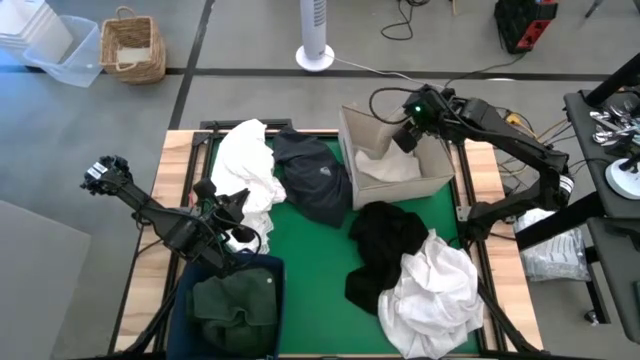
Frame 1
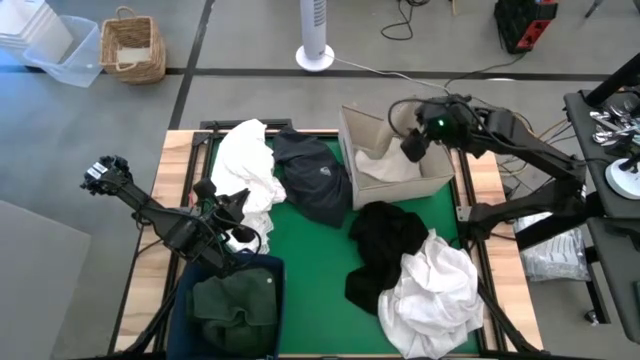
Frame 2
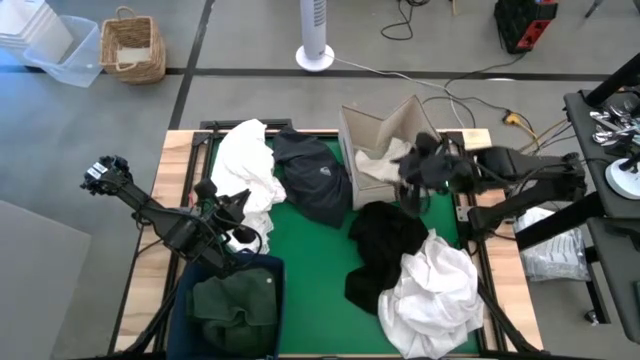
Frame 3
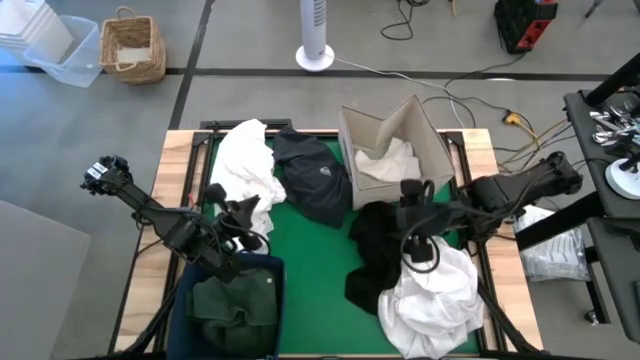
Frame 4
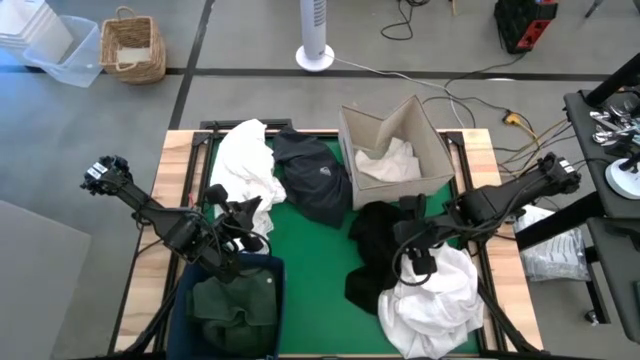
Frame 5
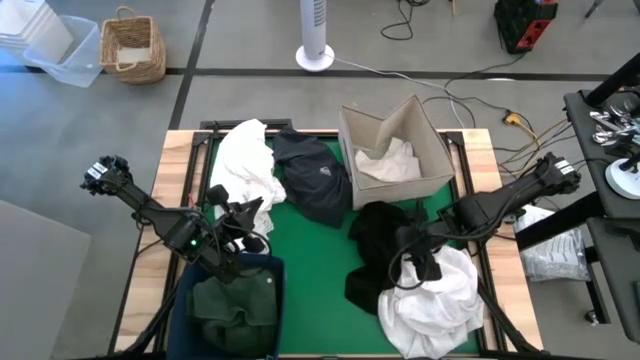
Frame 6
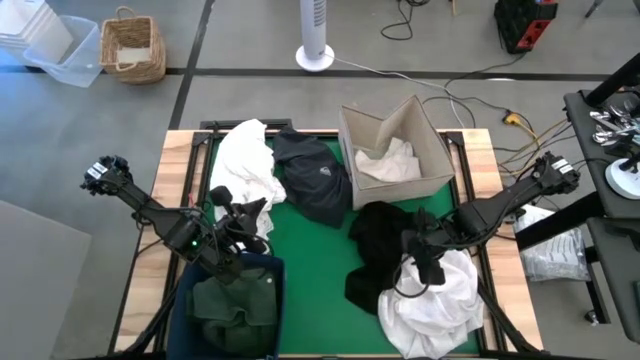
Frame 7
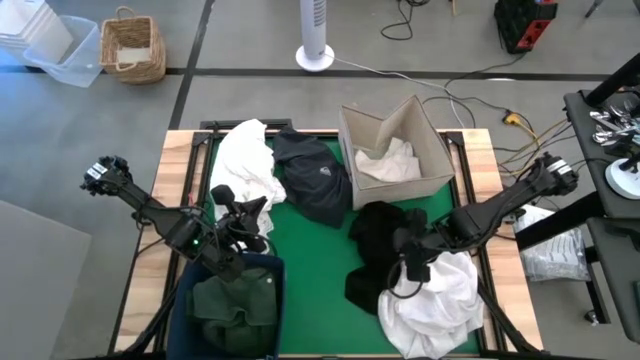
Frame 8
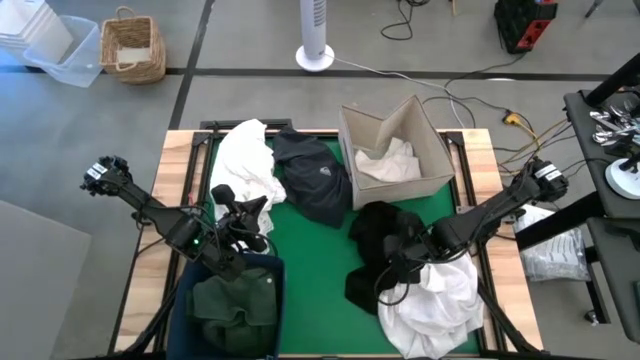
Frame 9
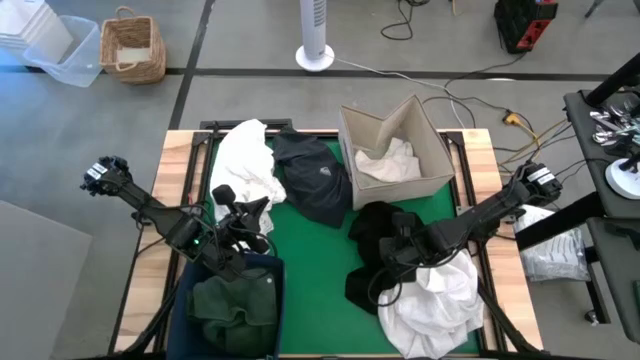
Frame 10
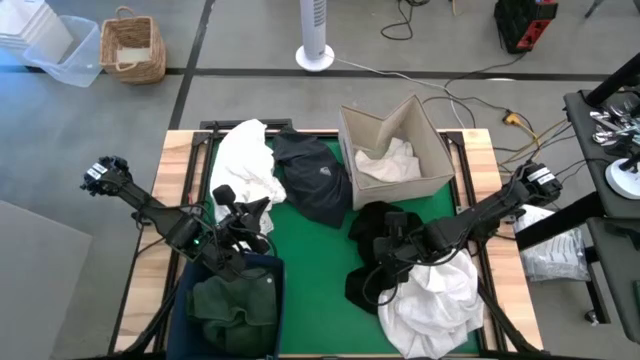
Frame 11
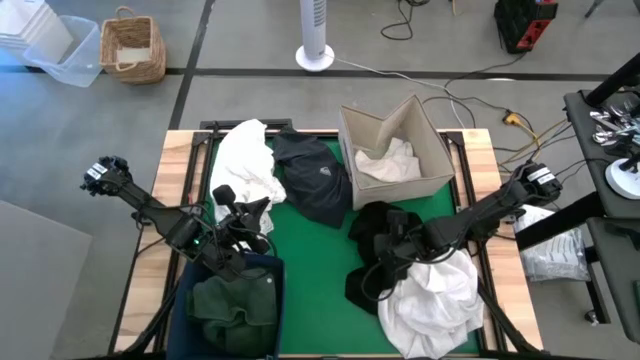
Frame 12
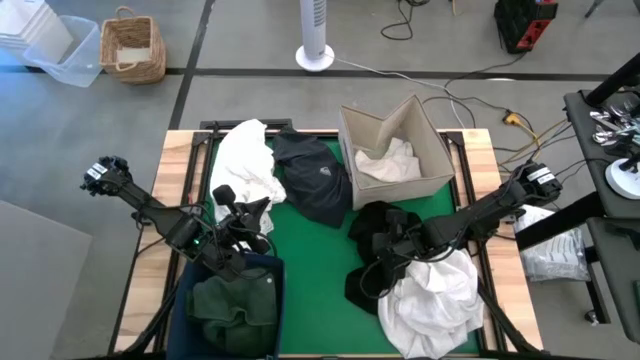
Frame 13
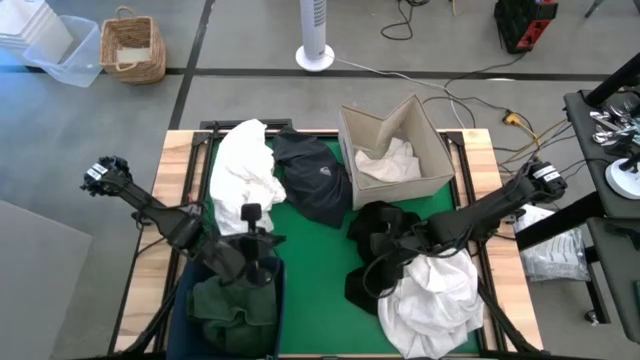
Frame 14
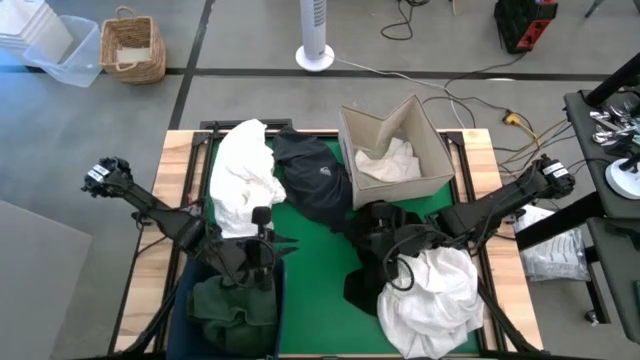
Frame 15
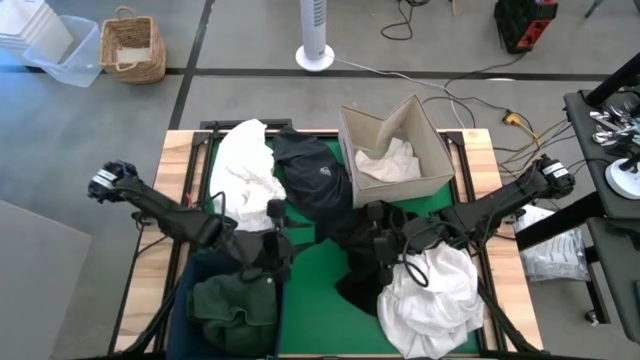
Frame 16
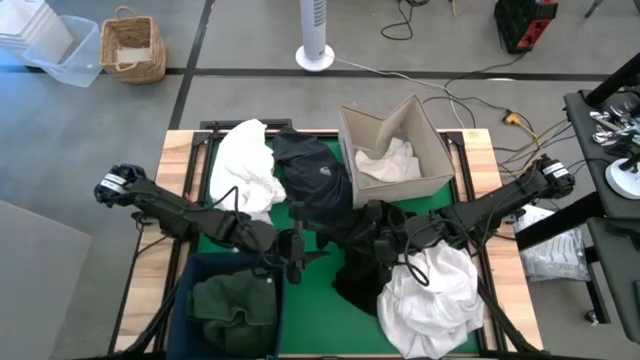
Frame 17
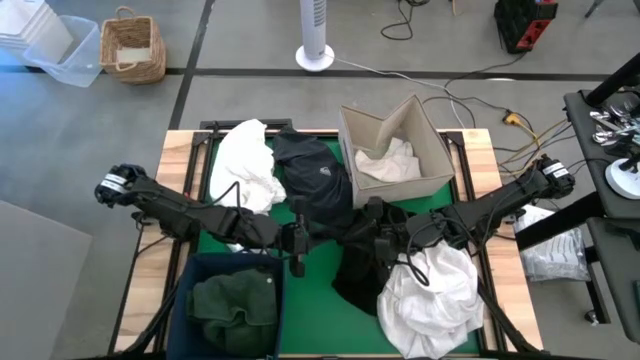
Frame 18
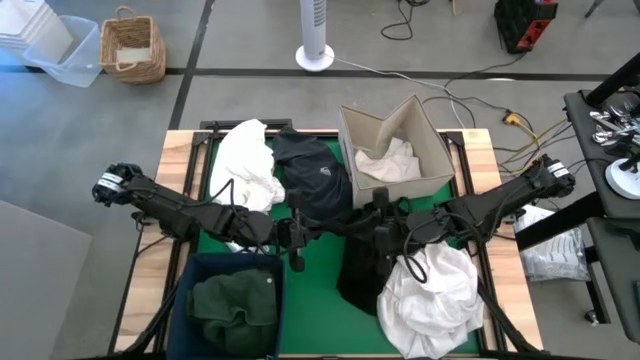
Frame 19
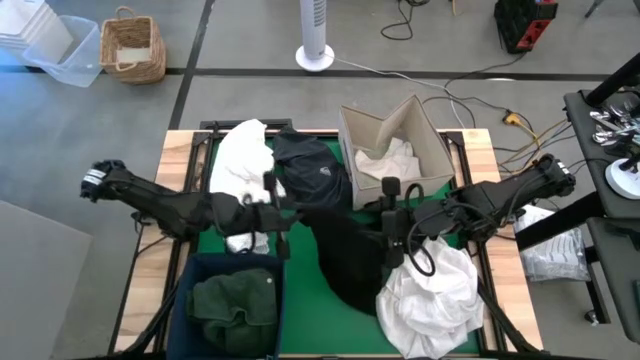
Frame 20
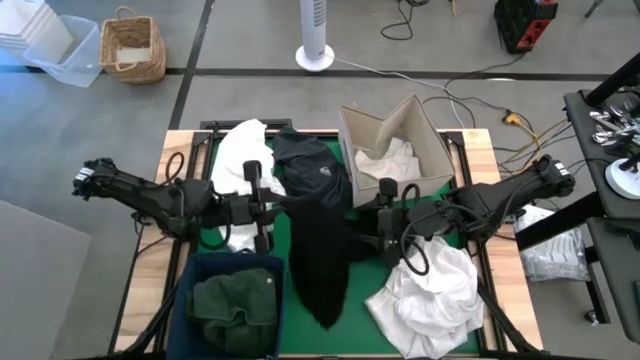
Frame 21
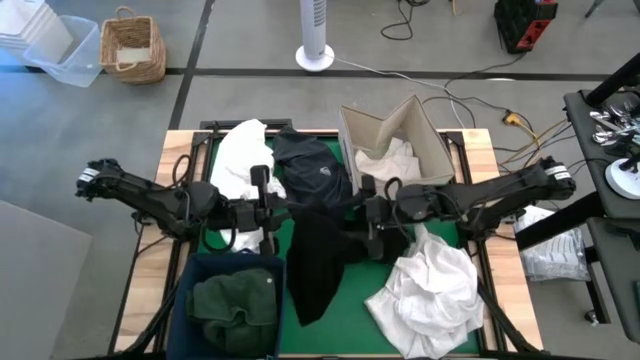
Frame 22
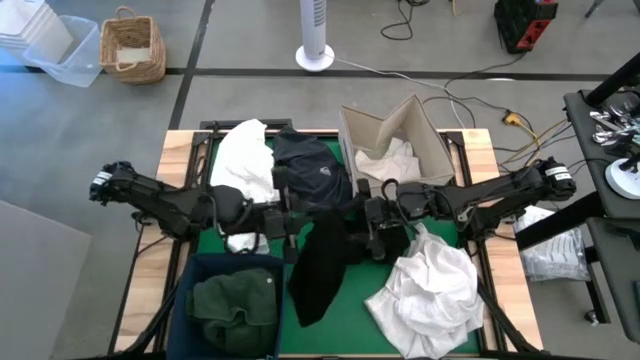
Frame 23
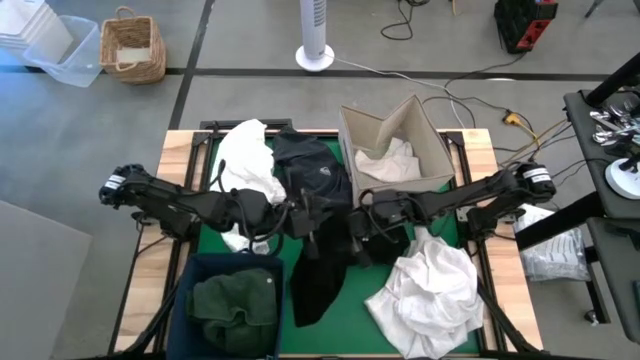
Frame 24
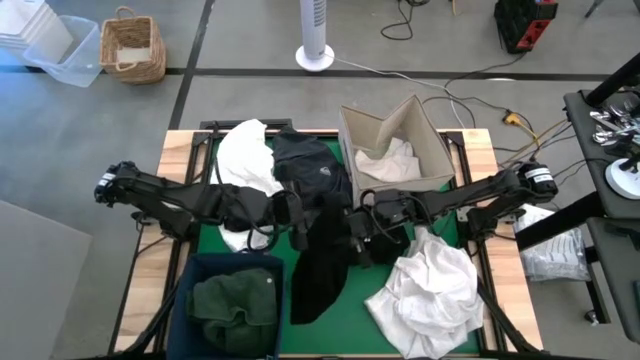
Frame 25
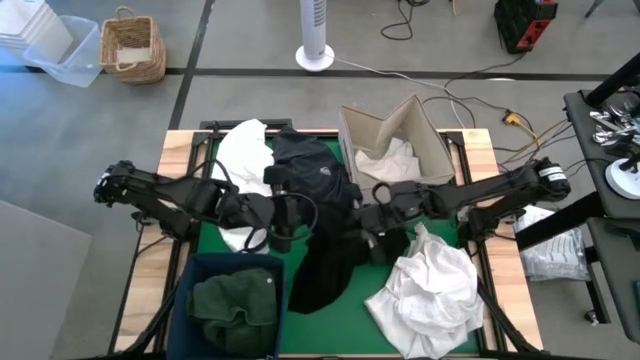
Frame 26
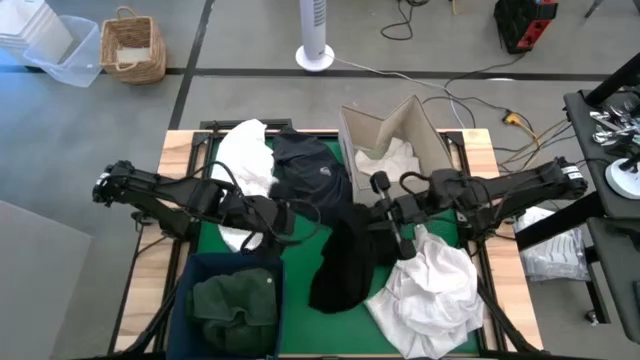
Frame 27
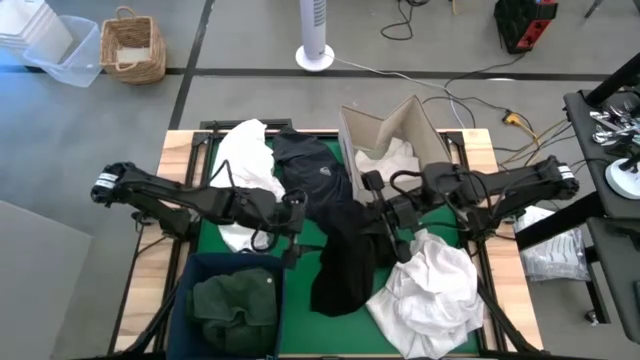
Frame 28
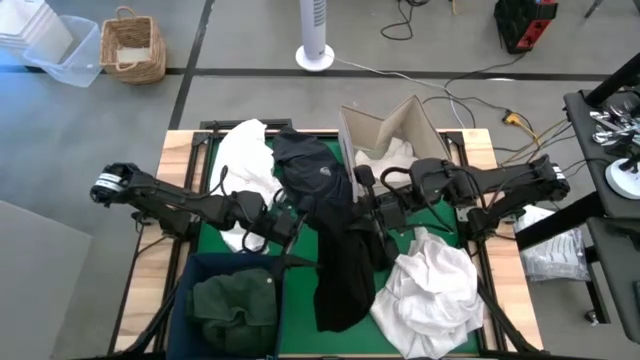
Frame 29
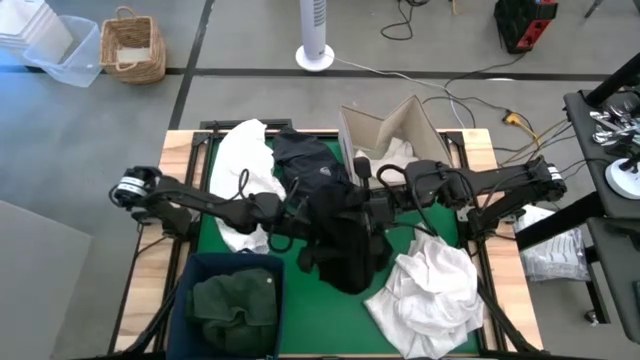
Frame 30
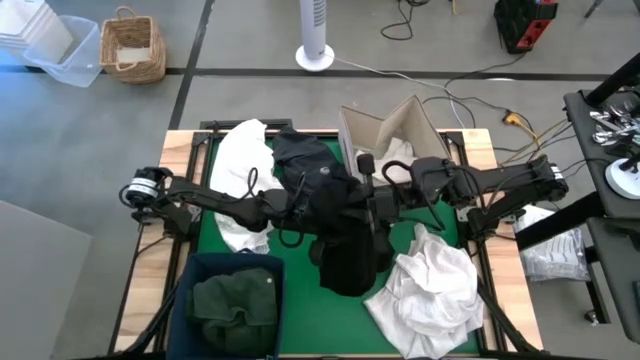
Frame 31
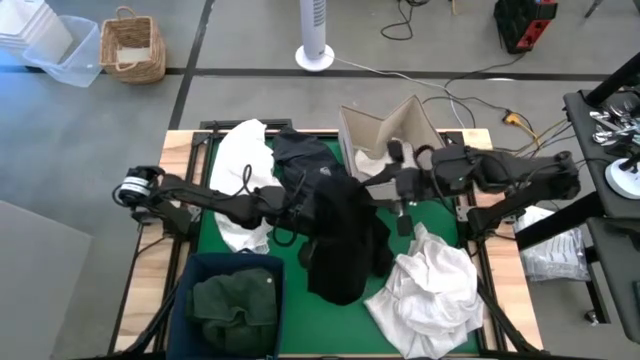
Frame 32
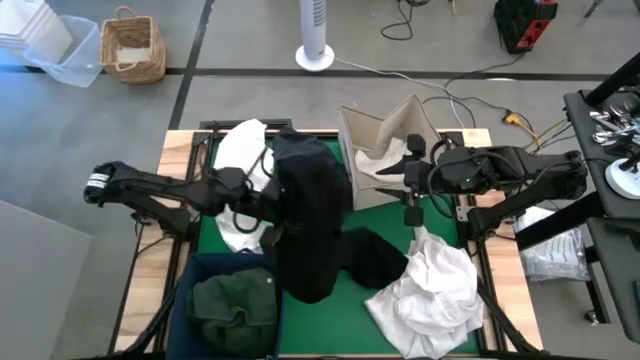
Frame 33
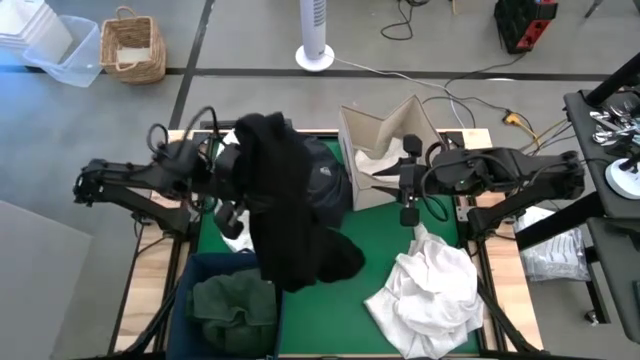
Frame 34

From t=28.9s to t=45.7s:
Put the black jacket into the blue laundry organizer
